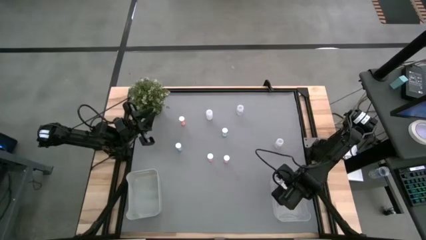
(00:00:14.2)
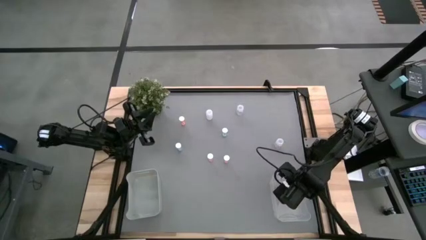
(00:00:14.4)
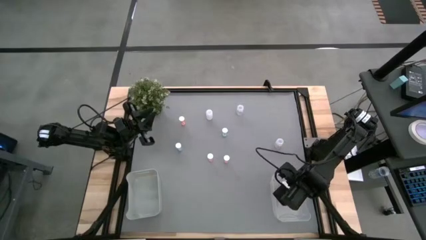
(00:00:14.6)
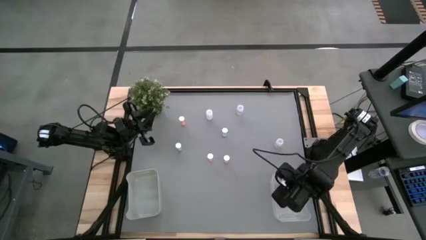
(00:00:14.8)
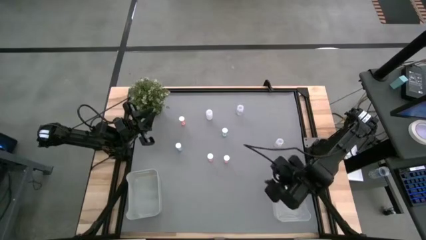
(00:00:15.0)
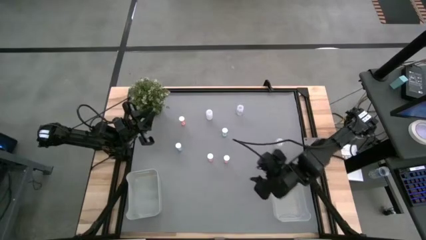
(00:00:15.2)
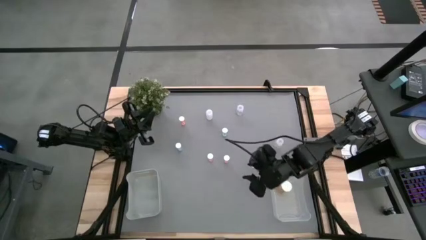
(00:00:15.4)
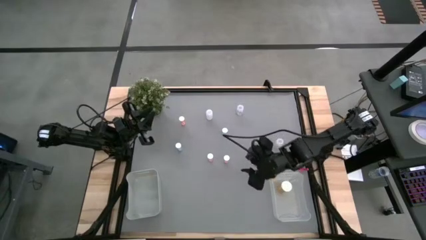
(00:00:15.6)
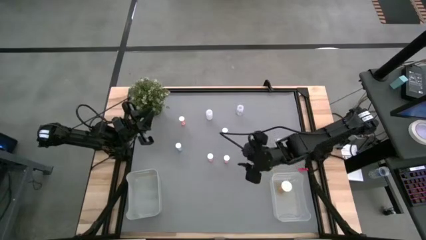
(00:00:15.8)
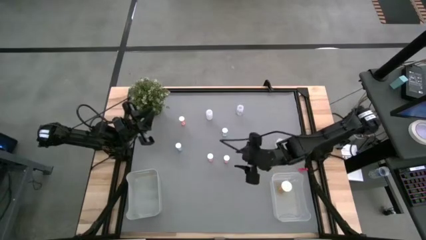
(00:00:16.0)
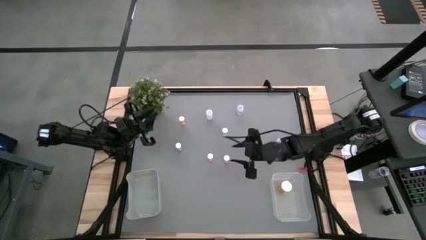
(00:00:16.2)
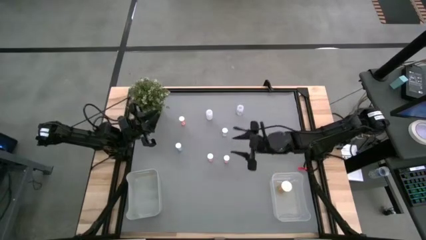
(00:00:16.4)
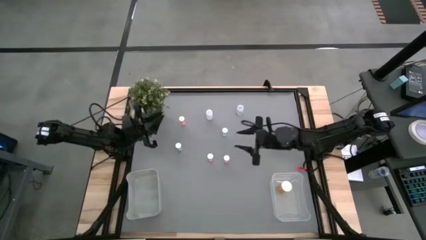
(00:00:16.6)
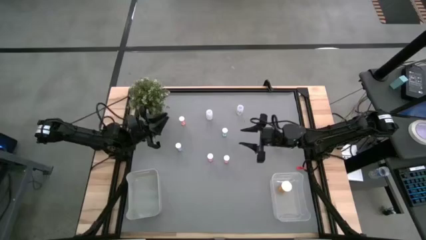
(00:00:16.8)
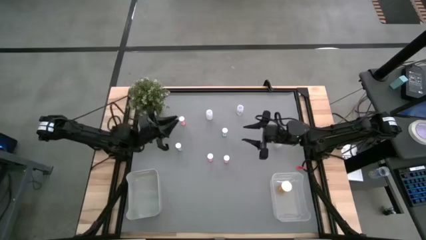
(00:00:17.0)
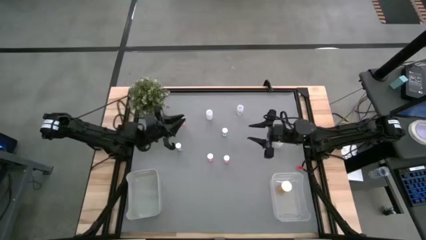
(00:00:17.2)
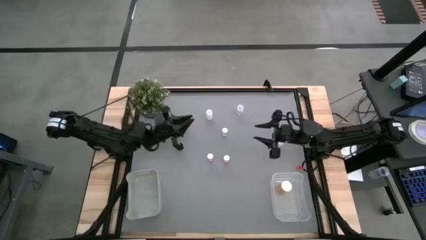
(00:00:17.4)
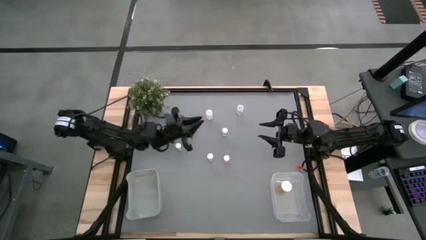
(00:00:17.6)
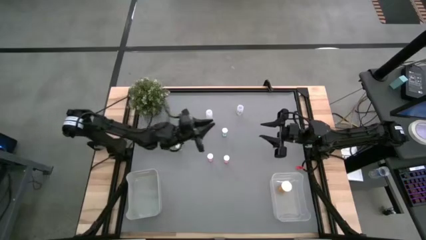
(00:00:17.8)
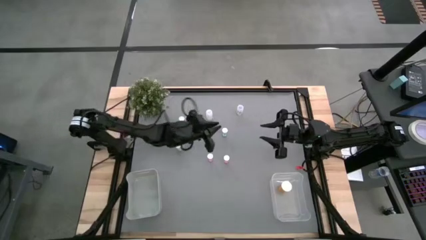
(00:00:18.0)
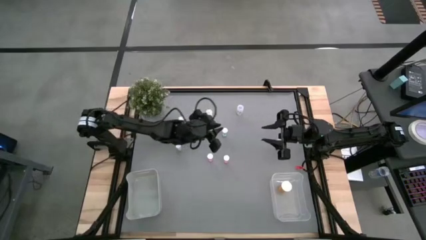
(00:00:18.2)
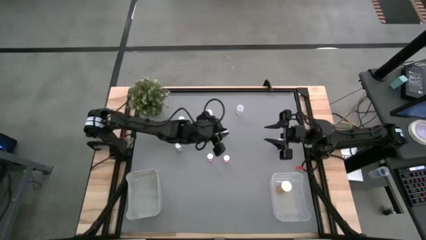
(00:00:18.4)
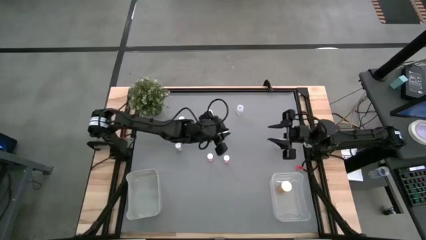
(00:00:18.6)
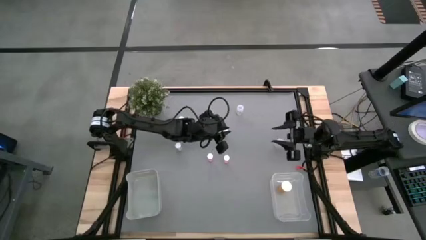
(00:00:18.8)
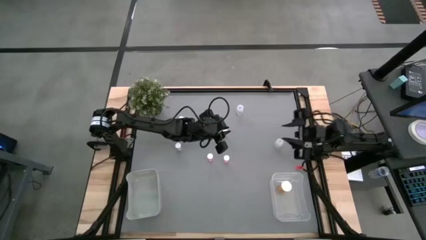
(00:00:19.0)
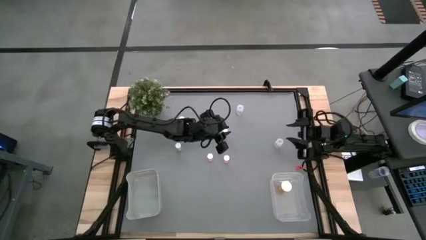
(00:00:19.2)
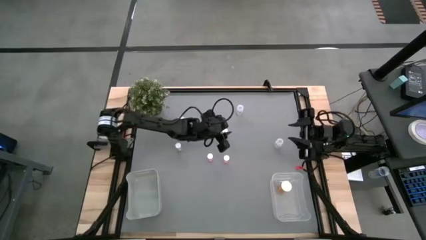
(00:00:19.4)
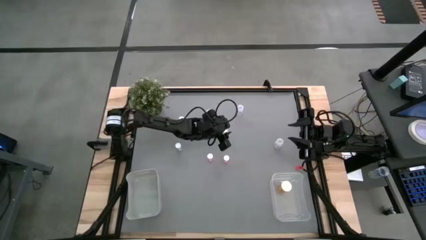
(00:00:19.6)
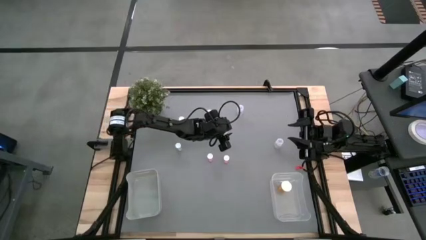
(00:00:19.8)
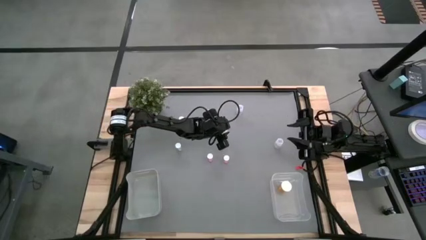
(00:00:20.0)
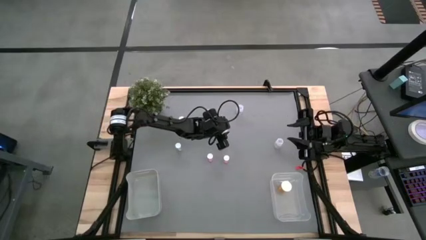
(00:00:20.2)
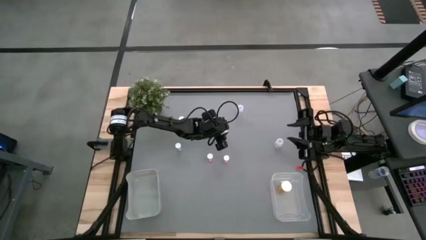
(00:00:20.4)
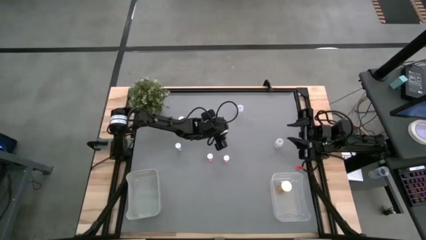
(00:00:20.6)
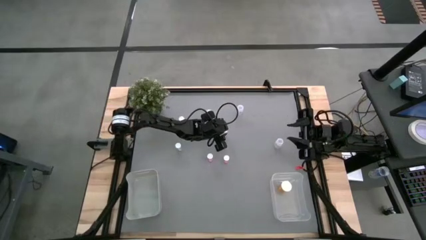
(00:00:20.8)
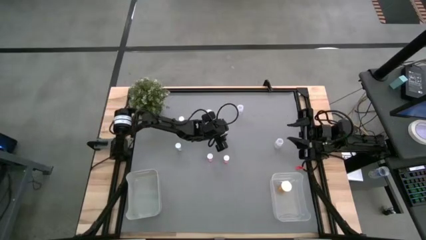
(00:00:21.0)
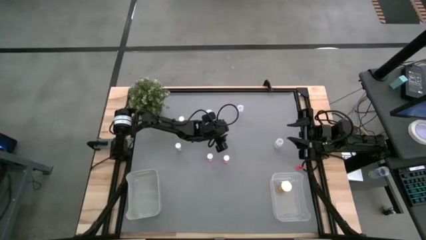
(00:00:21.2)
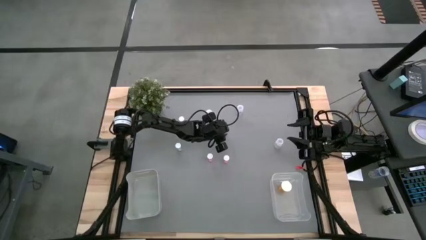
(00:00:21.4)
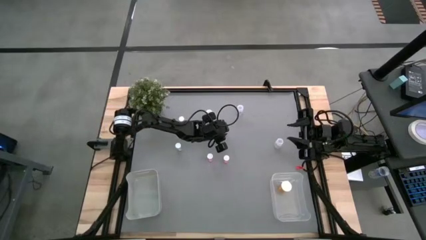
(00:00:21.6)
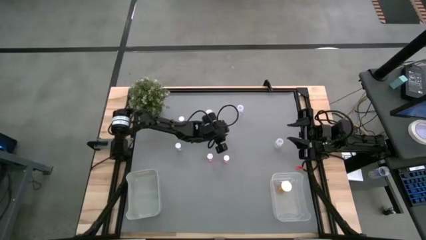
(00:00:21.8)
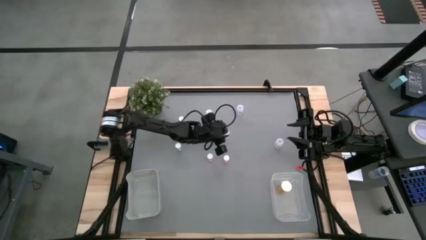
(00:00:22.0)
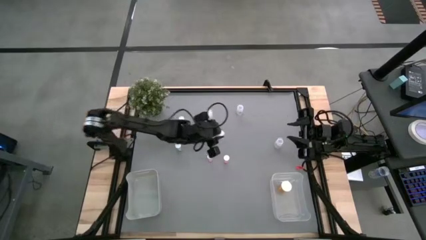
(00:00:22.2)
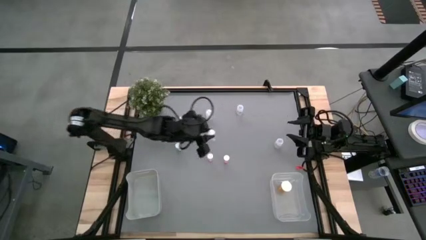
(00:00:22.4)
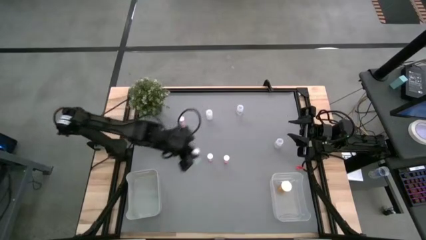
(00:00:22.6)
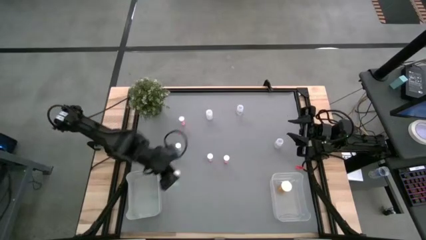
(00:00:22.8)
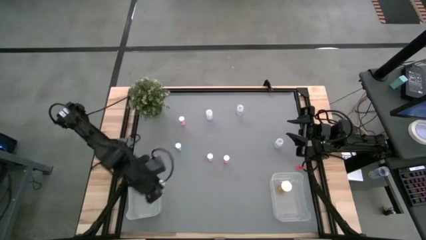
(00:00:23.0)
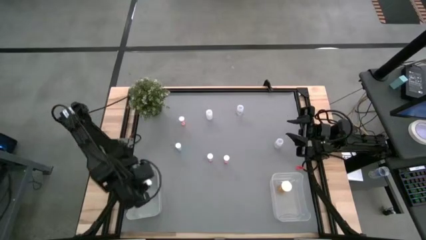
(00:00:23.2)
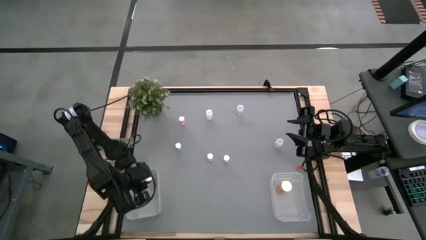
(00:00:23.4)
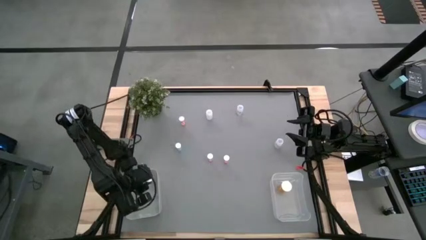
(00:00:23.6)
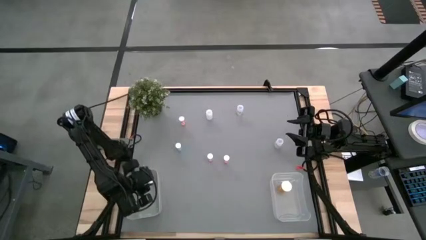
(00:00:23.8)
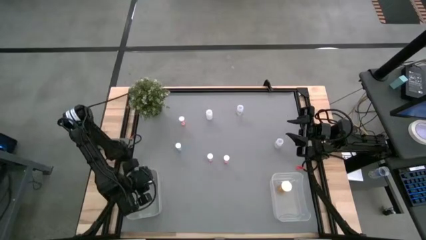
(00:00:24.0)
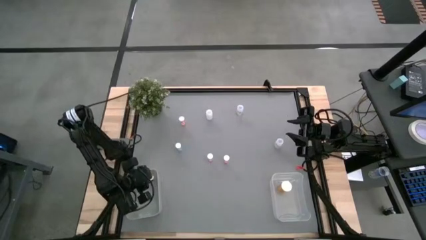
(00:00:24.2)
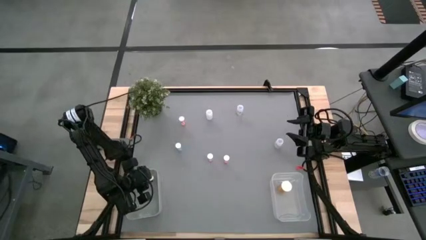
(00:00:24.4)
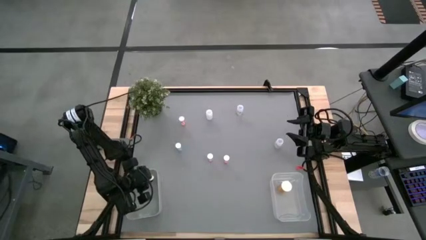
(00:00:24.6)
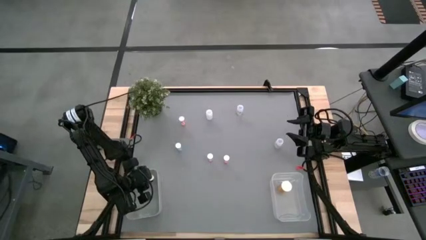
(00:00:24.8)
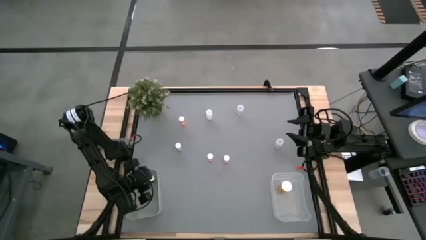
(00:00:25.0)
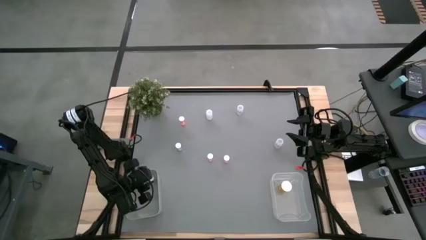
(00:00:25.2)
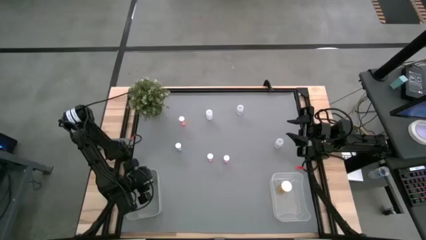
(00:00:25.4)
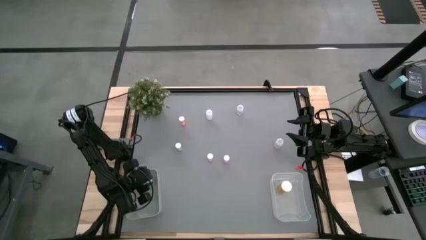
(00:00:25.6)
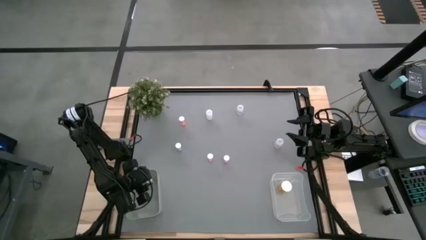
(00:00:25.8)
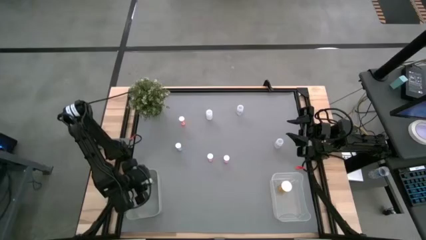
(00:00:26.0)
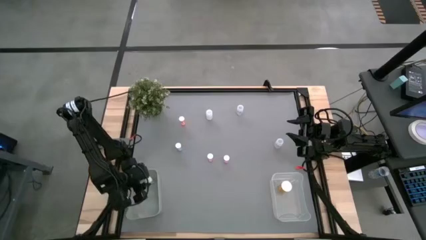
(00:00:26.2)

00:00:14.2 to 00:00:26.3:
Task: Pick and place medicine bottles into bin by pill shape (circle, oval)
Put the right blue tablet bottle into the gray bin

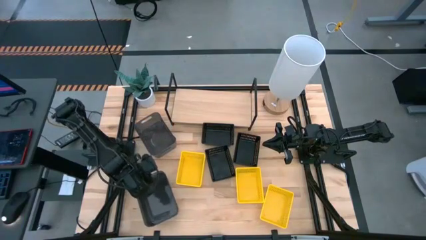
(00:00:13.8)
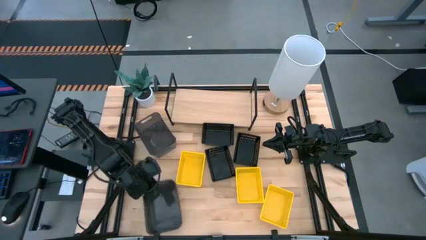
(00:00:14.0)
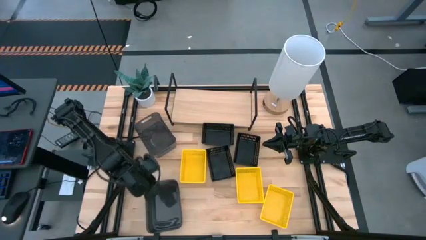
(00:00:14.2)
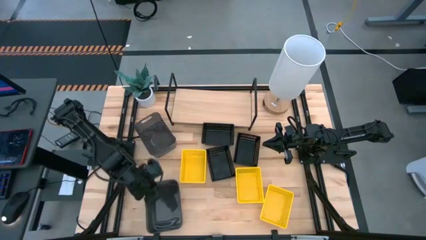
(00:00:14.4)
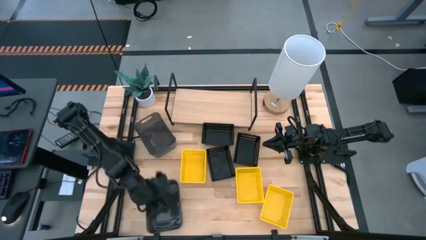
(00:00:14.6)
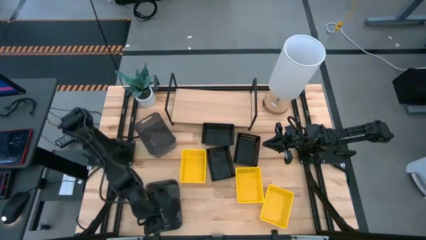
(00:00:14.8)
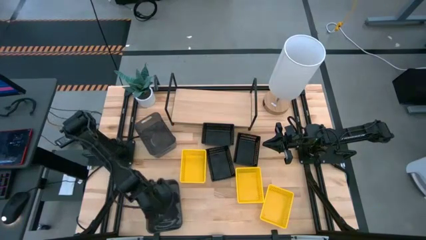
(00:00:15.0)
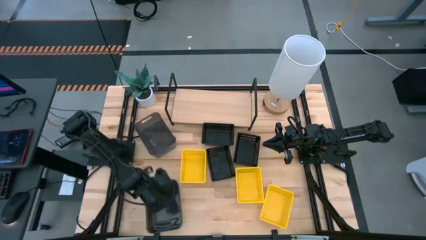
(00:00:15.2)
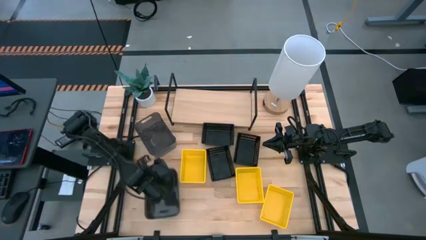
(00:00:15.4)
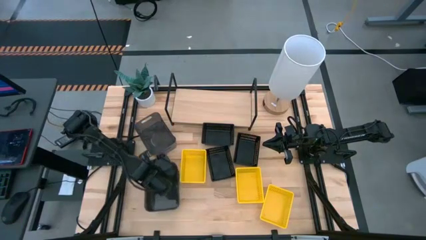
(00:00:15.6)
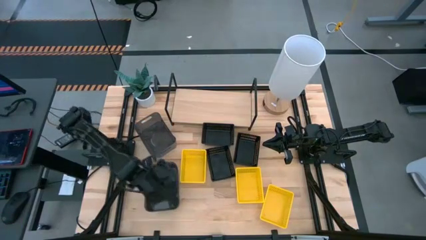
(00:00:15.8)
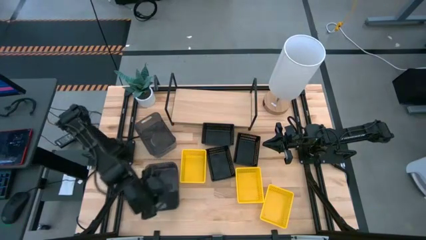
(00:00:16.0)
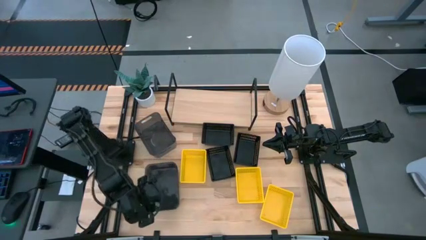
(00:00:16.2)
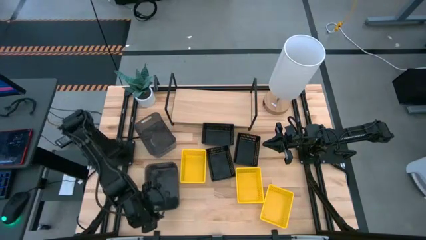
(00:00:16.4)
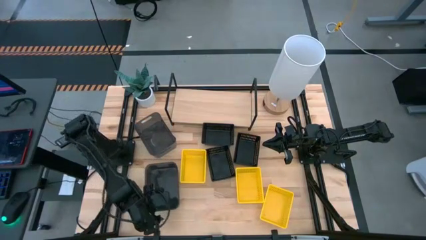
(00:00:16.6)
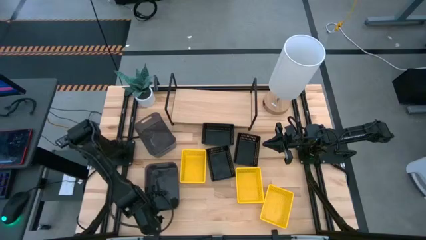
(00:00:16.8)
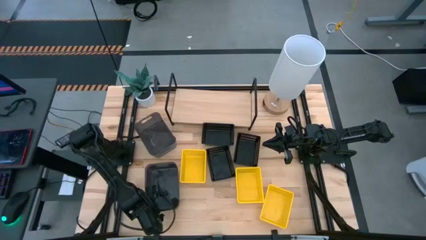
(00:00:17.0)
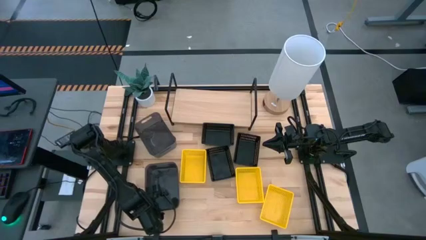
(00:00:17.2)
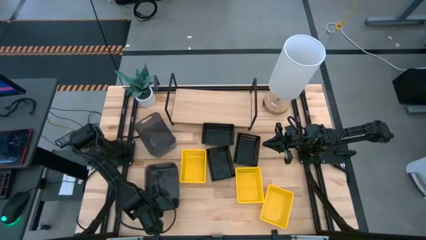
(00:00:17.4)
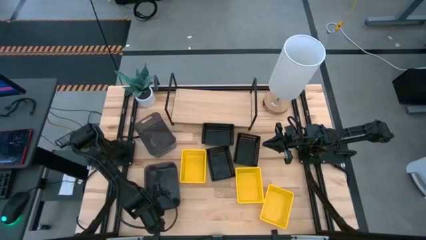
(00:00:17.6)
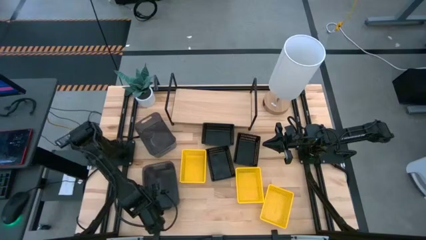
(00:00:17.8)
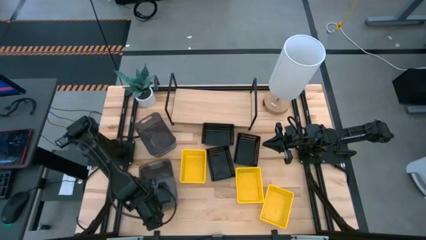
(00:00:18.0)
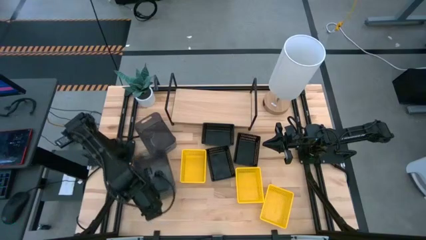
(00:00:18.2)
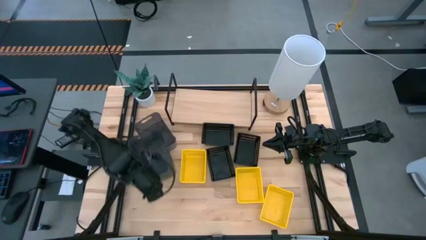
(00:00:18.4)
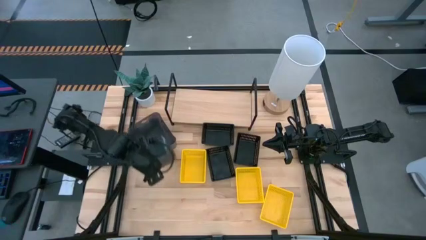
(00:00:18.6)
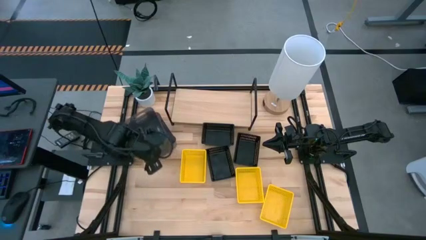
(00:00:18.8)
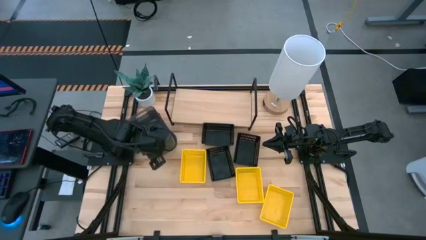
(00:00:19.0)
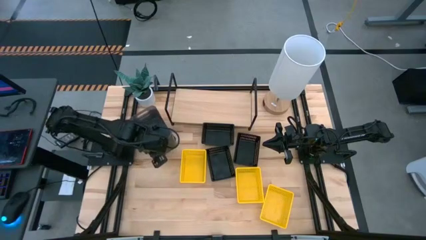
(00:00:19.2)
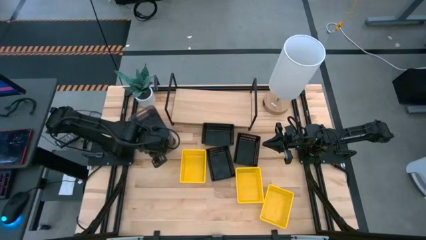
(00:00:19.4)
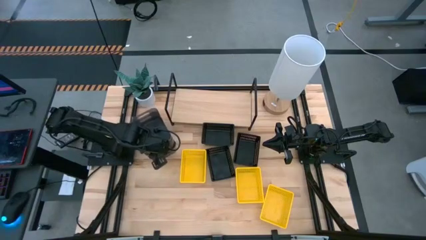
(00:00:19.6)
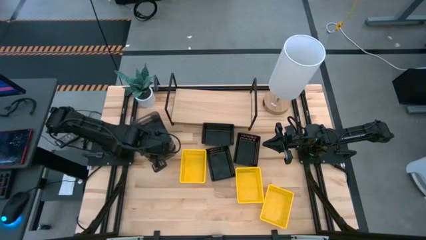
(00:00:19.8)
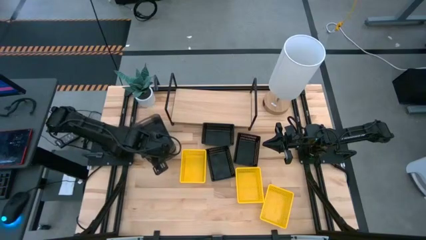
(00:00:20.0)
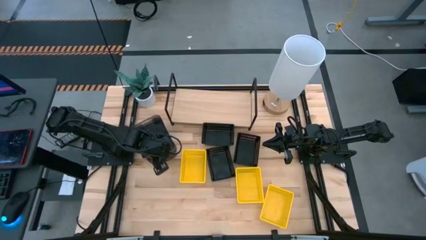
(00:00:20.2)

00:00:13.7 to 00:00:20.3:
Task: Stack baskets on shelf by color
Stack the black bin on top of the top black bin
